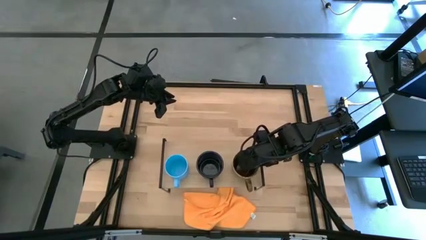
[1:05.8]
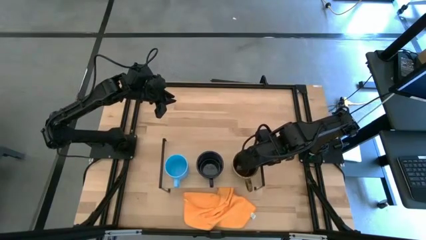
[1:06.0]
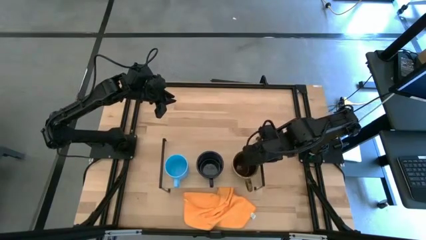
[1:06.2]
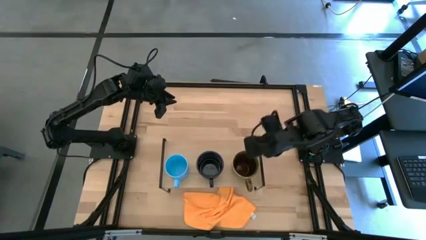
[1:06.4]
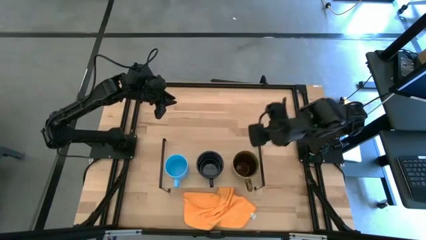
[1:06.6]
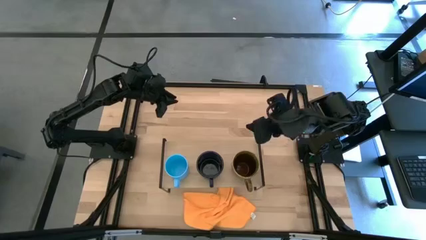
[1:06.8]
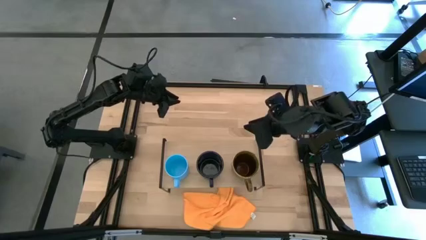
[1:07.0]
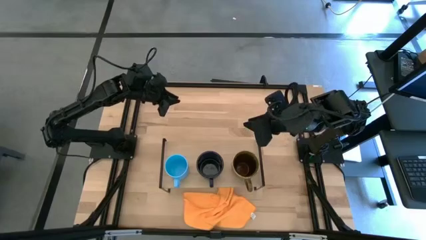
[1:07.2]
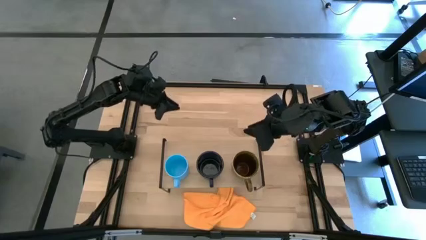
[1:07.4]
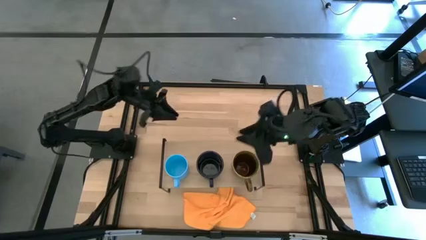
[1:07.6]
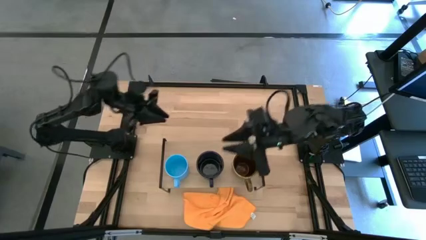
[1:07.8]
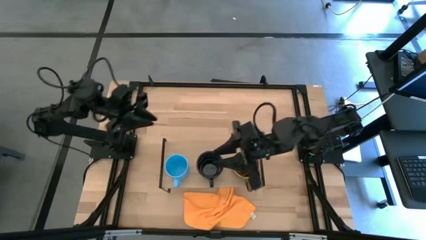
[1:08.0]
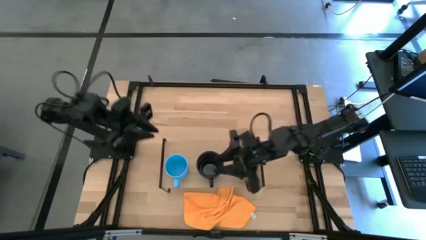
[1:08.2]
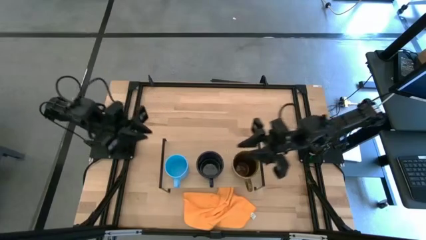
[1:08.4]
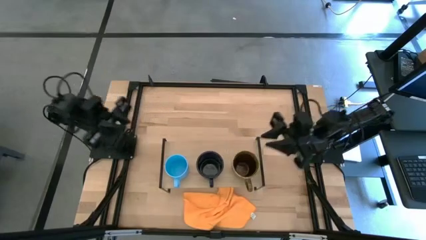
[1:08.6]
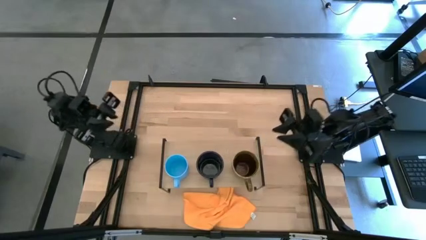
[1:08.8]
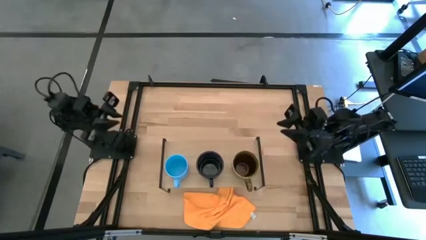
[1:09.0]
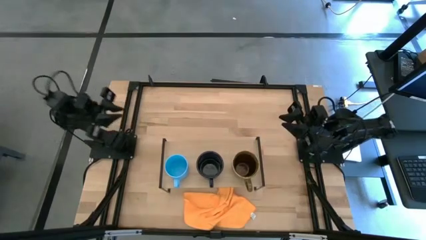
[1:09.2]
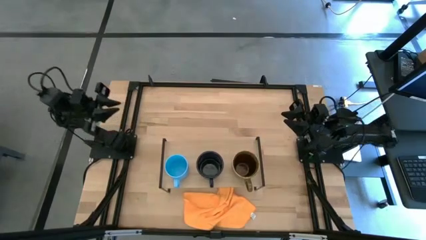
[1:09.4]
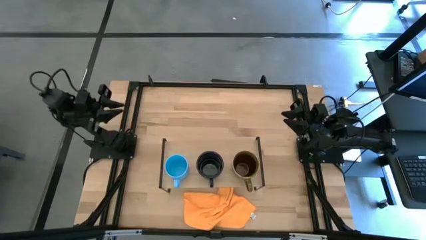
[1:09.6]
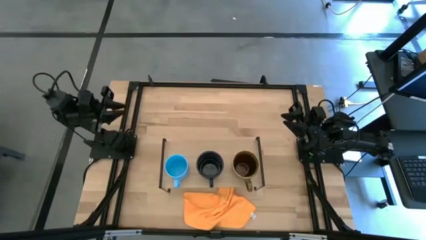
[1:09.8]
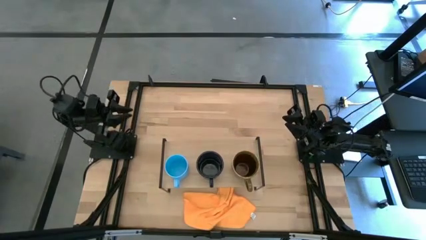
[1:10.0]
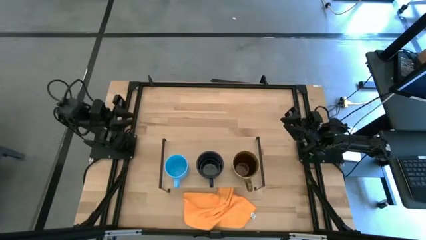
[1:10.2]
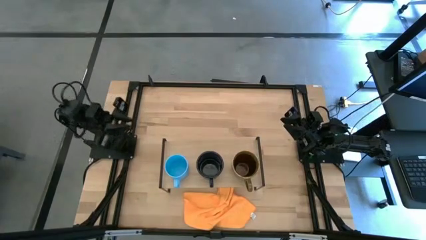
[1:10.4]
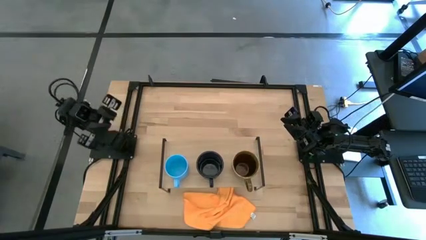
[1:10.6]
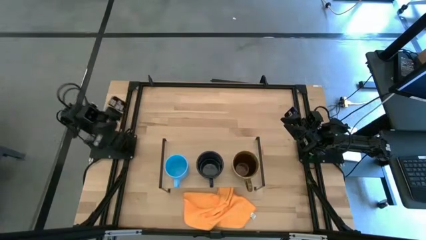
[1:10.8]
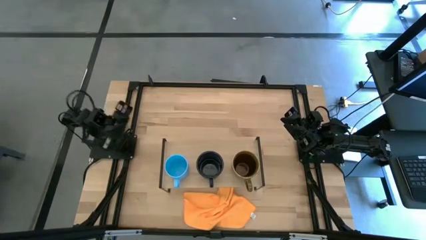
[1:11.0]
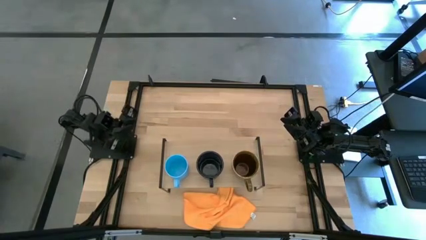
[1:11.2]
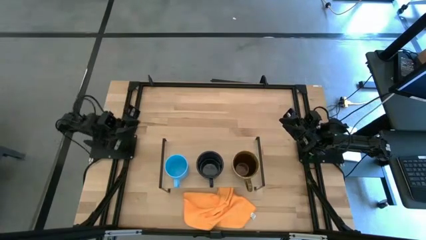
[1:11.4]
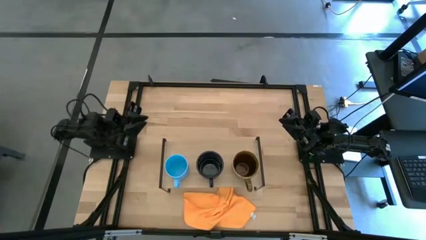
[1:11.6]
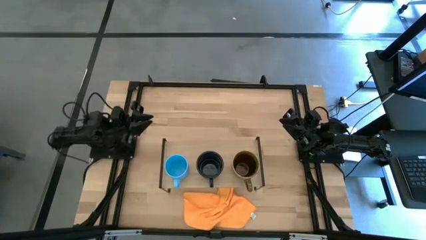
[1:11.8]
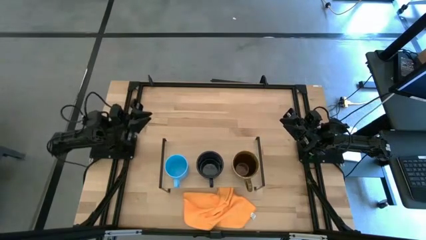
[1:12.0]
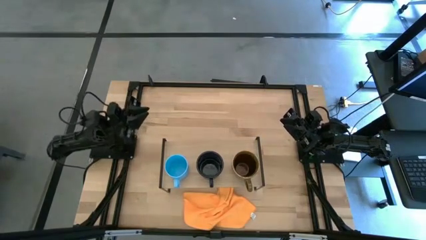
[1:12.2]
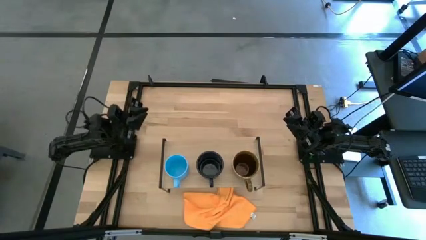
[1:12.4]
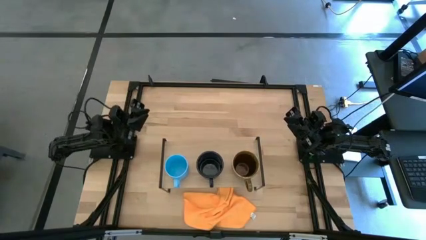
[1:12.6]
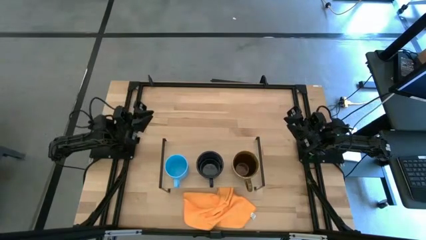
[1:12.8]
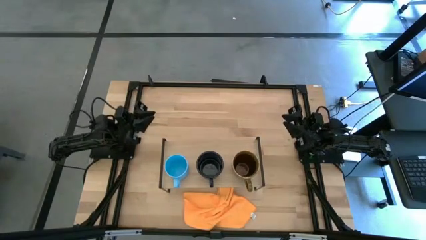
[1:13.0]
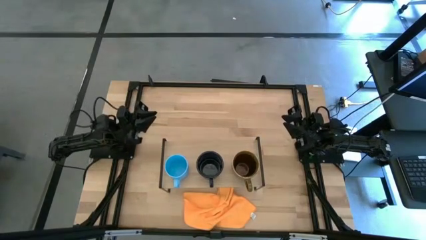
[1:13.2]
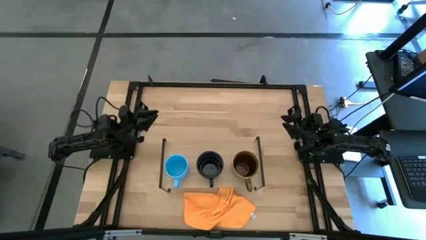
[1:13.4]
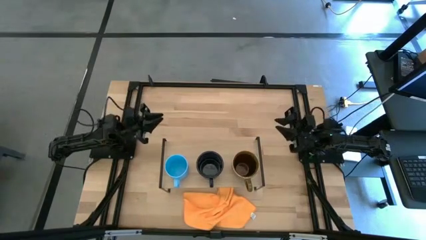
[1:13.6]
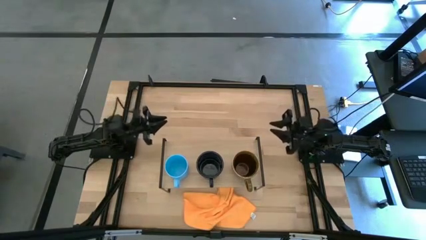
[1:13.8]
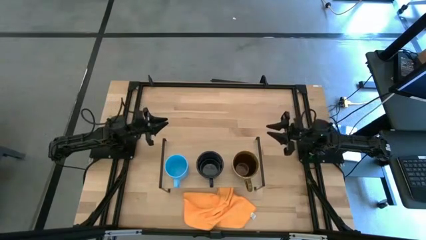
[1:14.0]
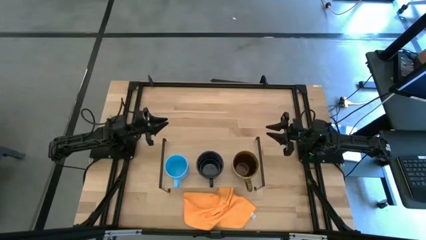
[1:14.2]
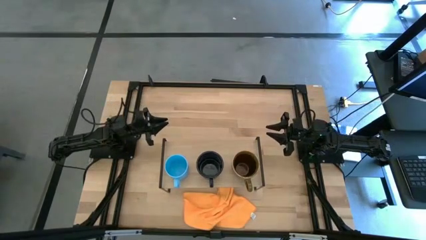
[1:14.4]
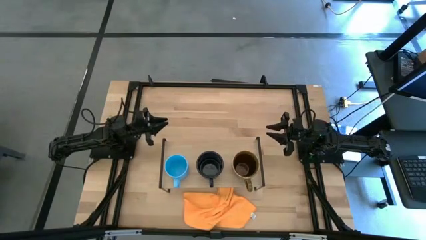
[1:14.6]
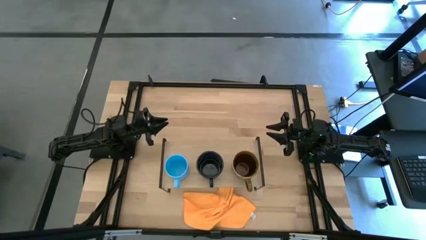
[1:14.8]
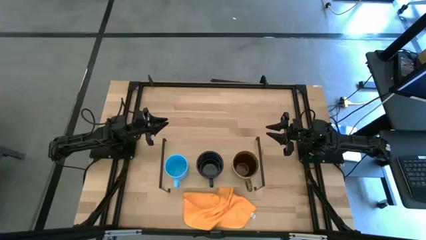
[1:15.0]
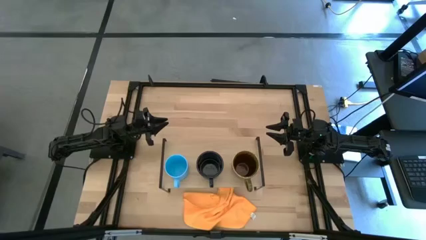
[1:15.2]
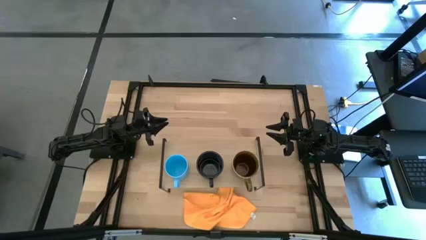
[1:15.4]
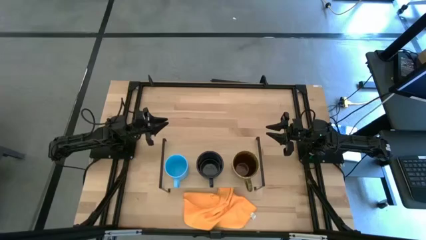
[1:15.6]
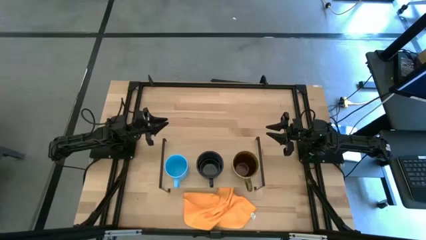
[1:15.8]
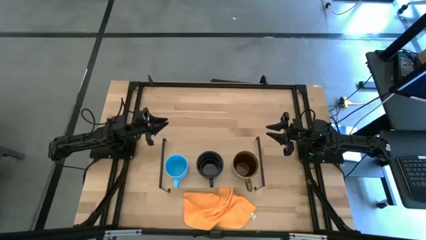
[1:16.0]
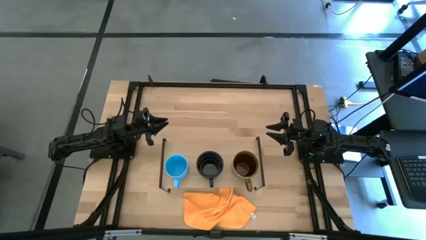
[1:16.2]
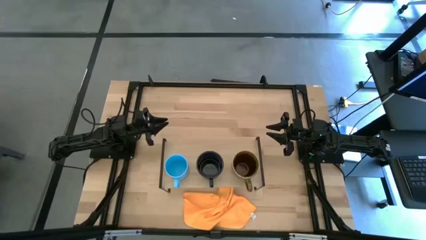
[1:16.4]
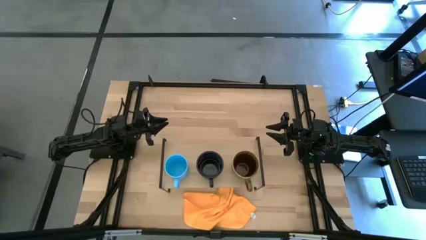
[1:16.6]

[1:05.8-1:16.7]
Task: Stack small to large cups/mugs on shelf
Return to Home Position

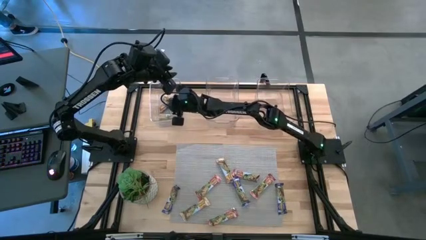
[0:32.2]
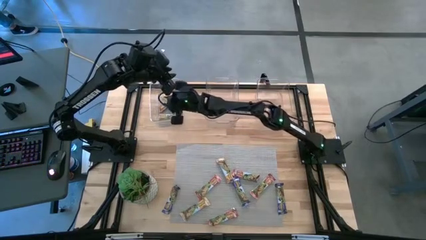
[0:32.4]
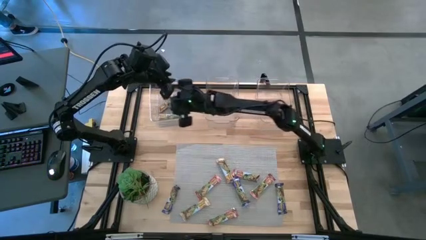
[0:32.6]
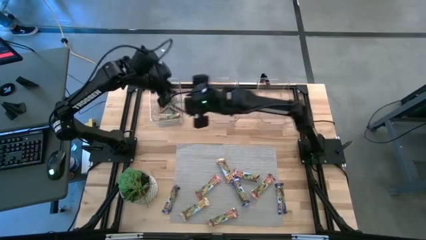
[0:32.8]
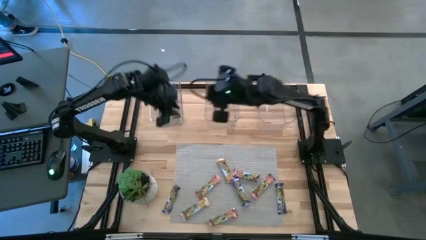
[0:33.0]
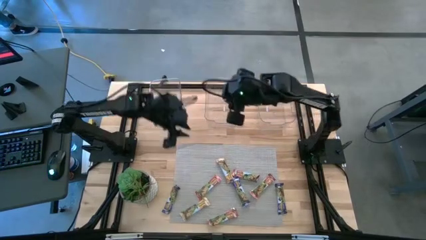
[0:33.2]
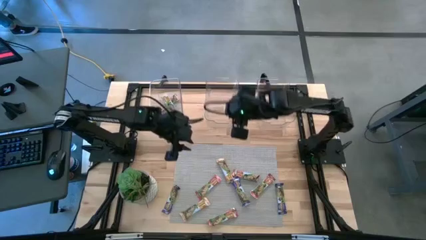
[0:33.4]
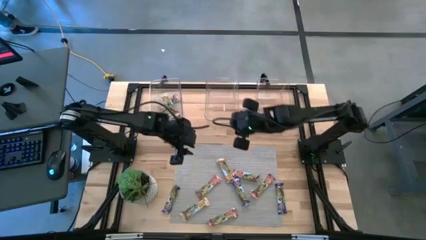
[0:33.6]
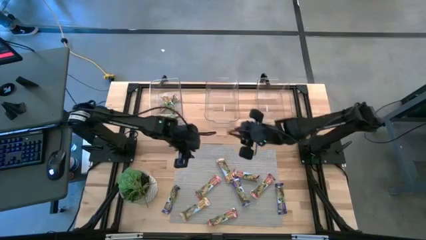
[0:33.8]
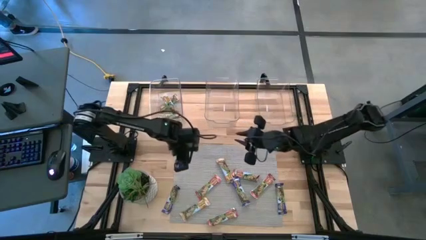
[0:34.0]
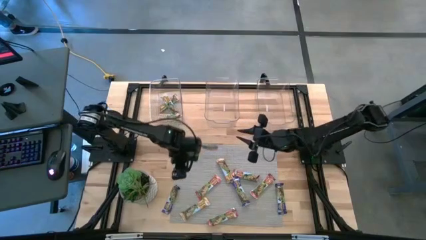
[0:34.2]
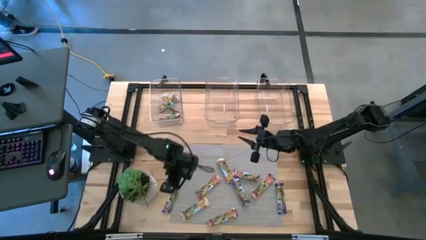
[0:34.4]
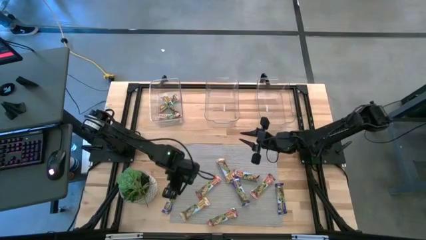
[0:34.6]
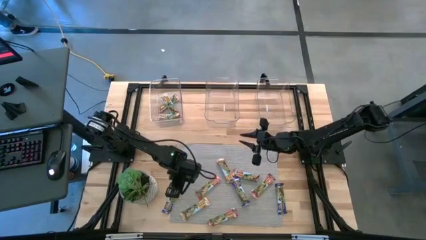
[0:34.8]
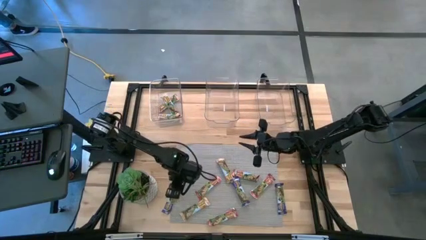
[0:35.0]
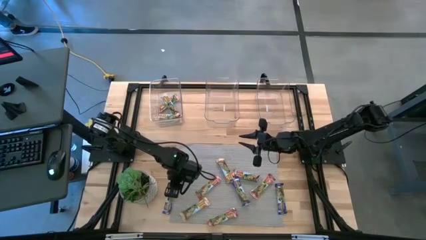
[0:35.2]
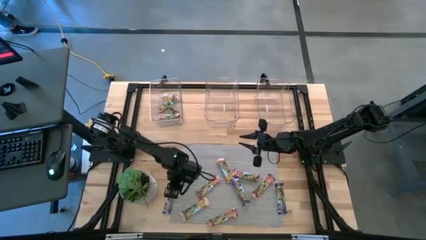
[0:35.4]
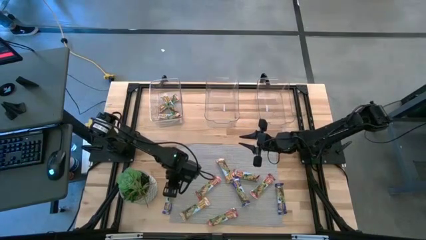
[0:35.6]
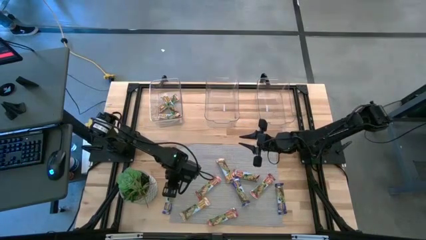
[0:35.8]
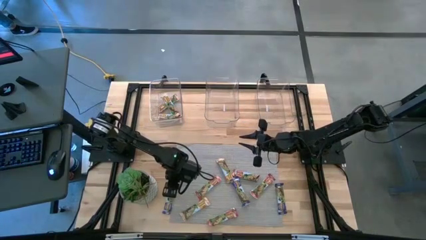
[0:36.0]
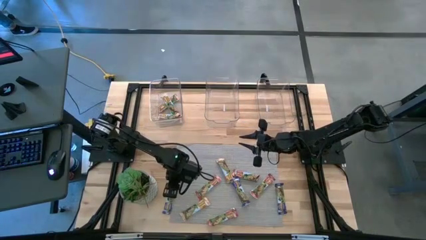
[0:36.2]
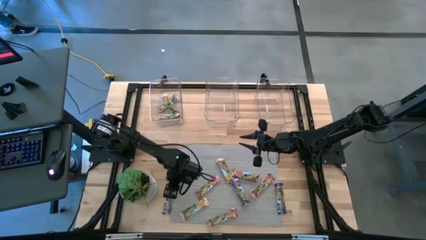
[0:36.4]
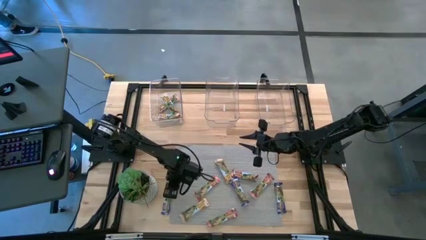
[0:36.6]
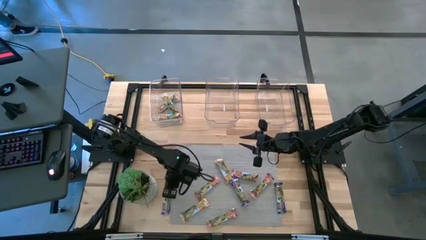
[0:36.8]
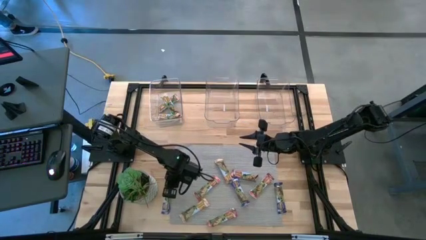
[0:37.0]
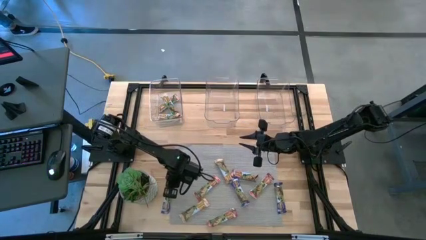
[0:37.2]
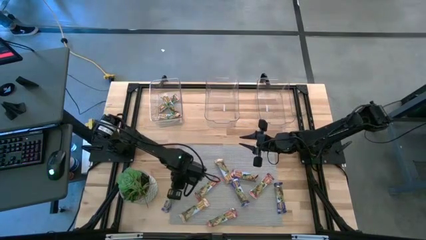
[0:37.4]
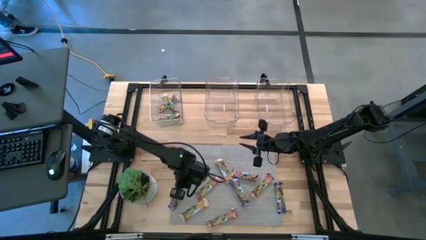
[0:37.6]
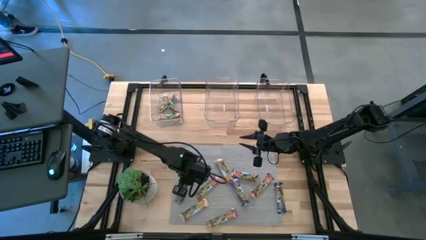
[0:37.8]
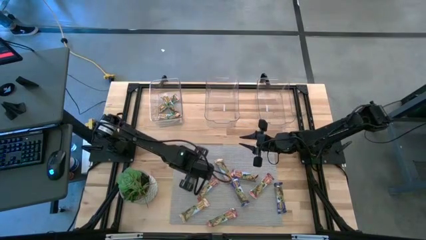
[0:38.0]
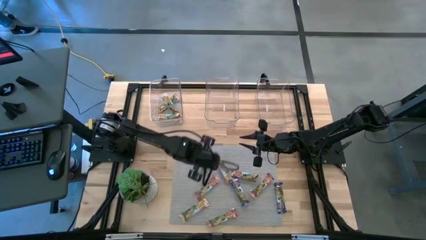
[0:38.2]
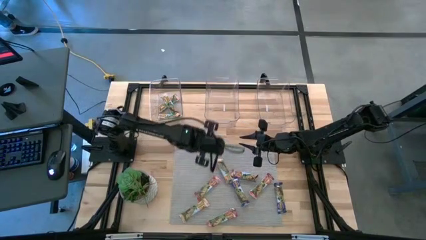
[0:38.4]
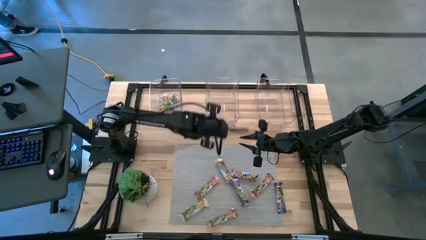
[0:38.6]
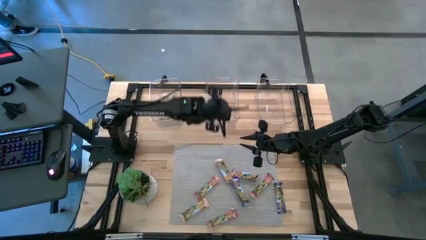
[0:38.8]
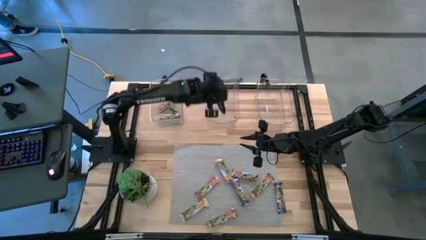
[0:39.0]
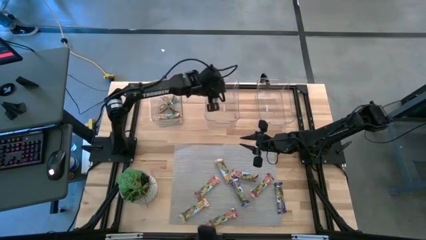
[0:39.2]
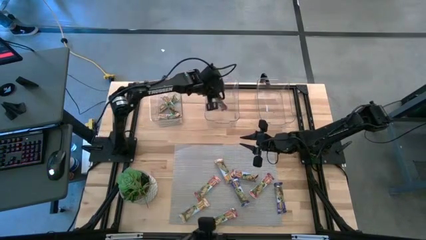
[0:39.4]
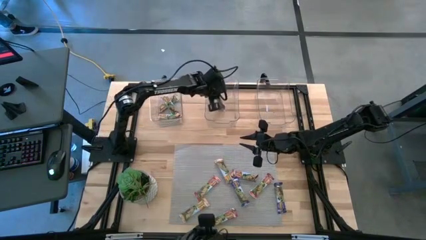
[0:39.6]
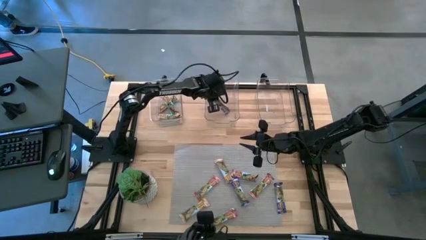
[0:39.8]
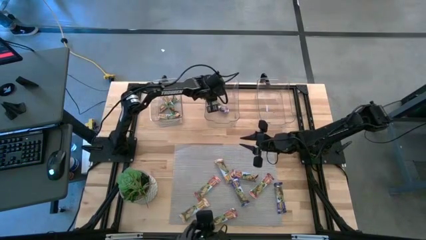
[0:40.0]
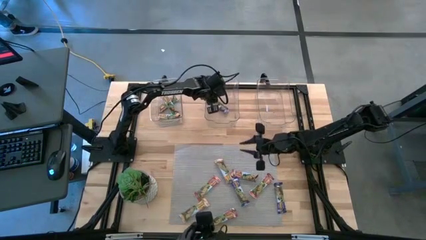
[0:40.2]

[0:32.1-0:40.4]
Task: Pick and place Granola Bars by type
Put the left blue granola bar into the middle transparent bin
